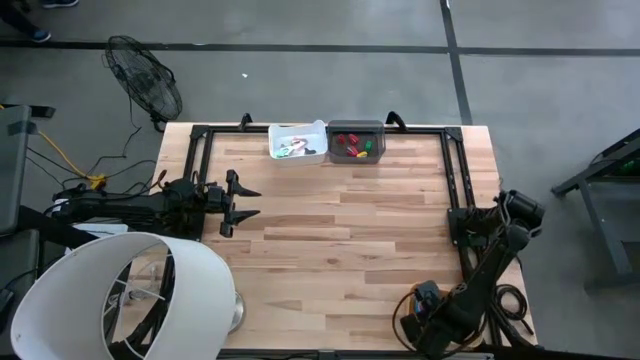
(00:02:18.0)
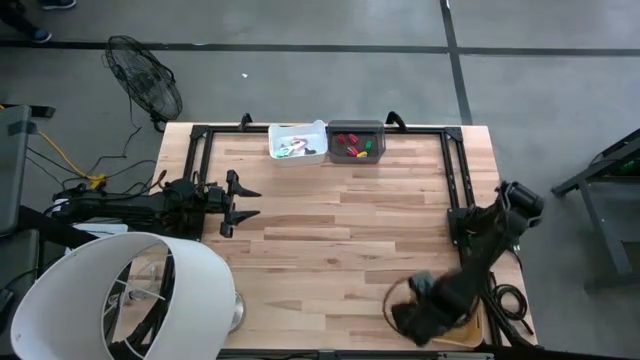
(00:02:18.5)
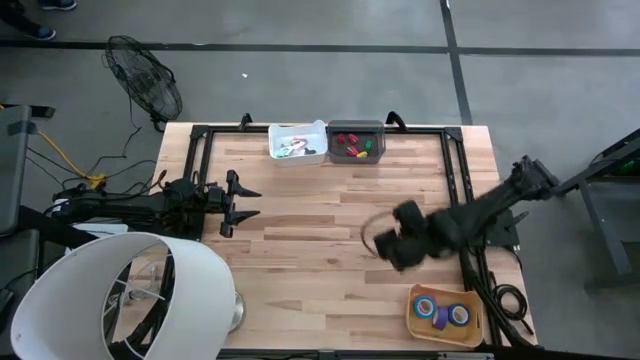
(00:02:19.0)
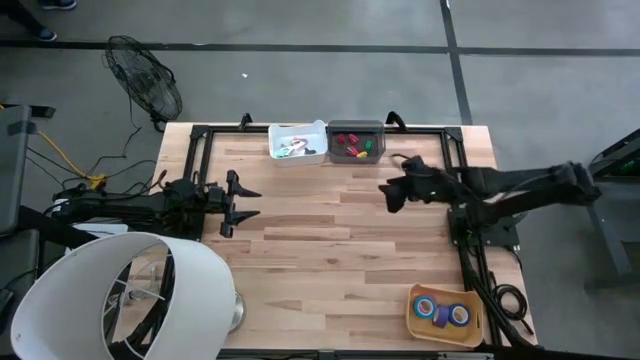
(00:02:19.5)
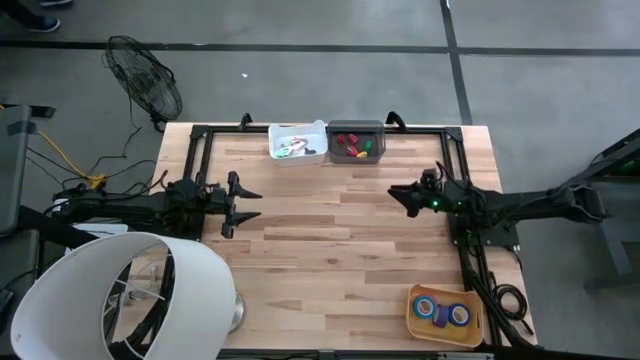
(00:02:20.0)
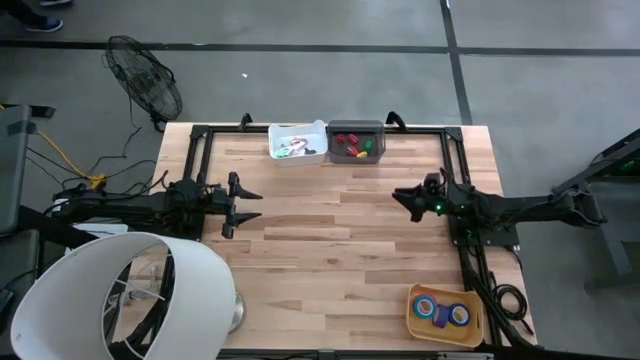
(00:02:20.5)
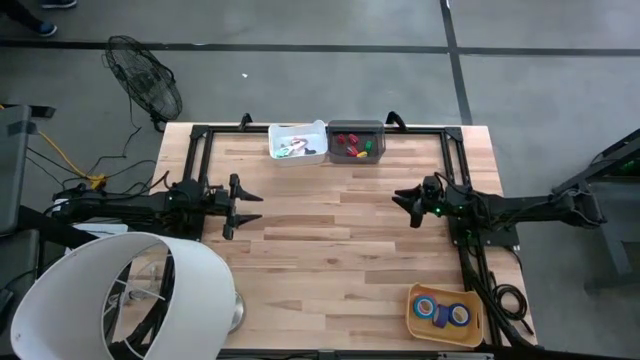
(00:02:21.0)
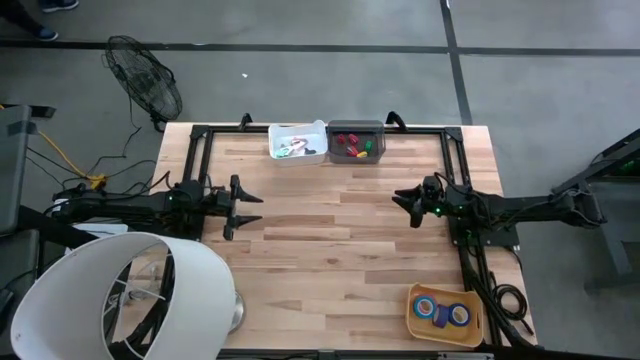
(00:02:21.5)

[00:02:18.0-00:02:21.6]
Task: Pick and place Stapler, Stapler remover, tape
Return to Home Position

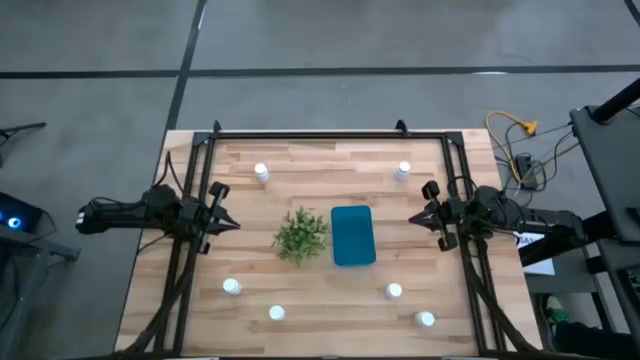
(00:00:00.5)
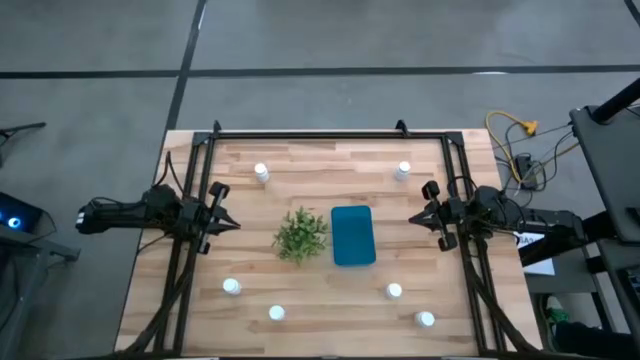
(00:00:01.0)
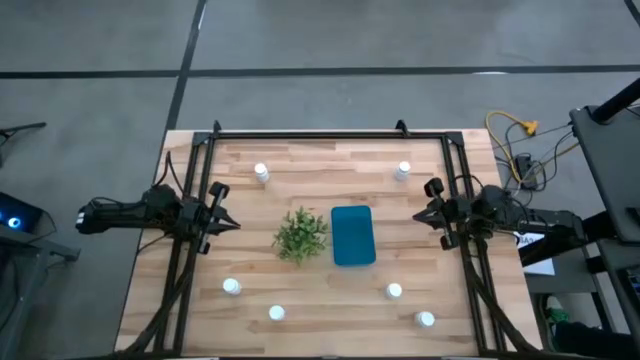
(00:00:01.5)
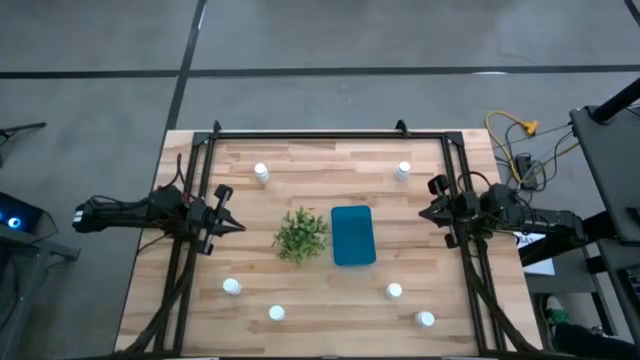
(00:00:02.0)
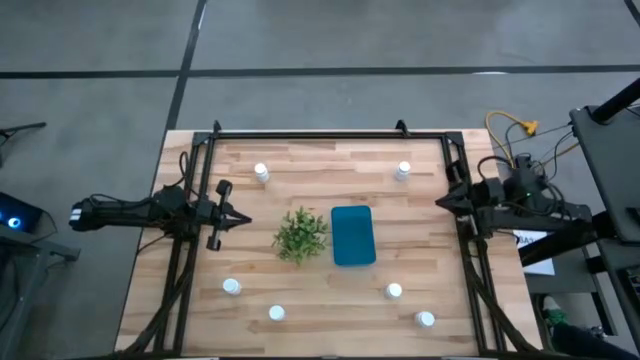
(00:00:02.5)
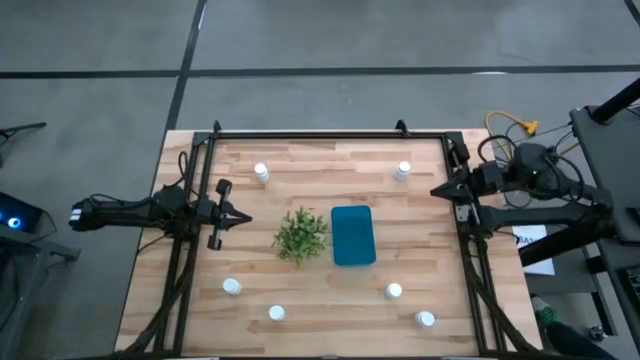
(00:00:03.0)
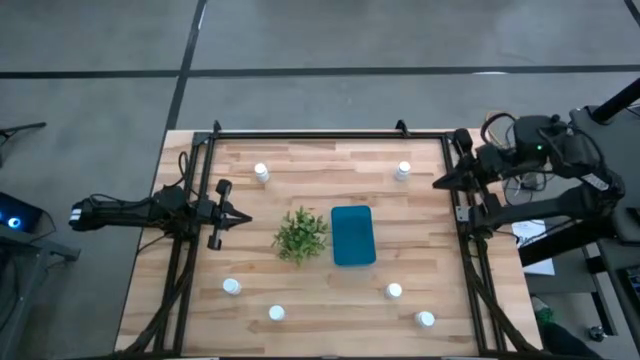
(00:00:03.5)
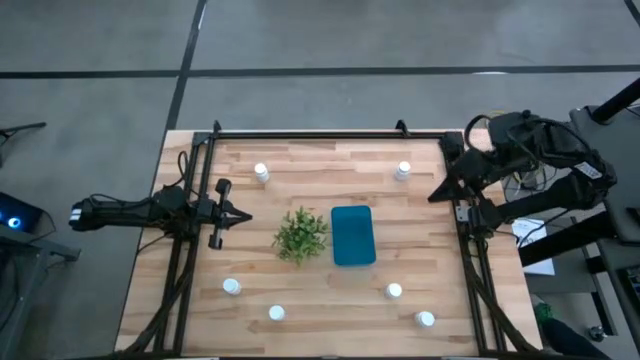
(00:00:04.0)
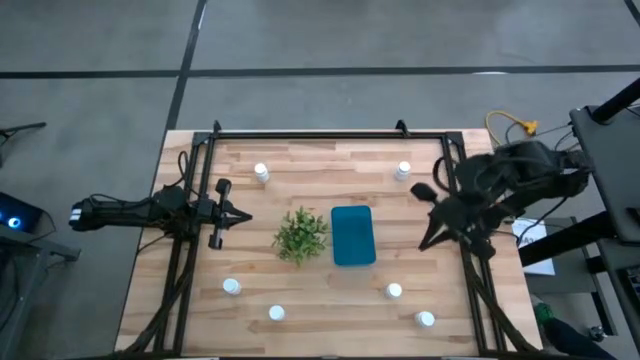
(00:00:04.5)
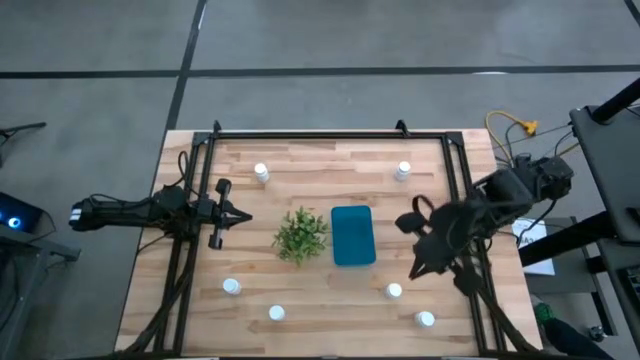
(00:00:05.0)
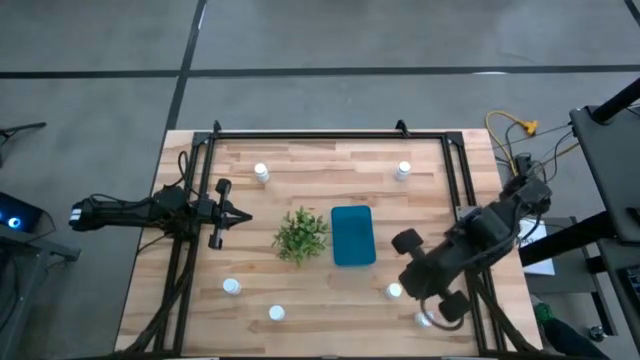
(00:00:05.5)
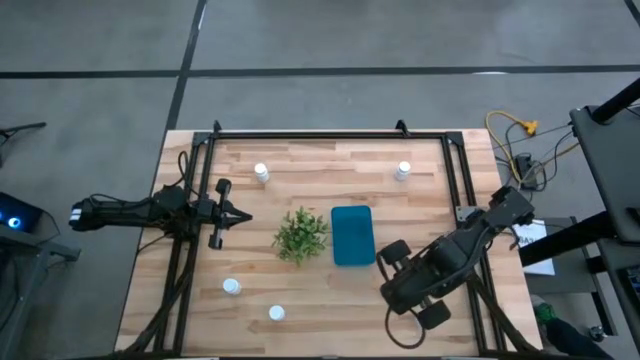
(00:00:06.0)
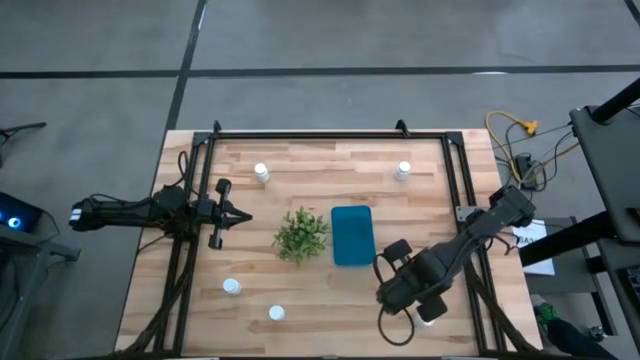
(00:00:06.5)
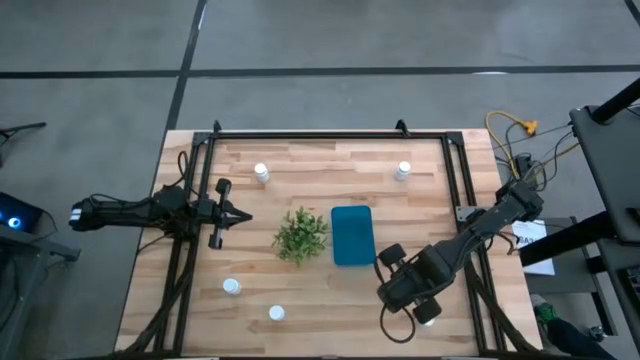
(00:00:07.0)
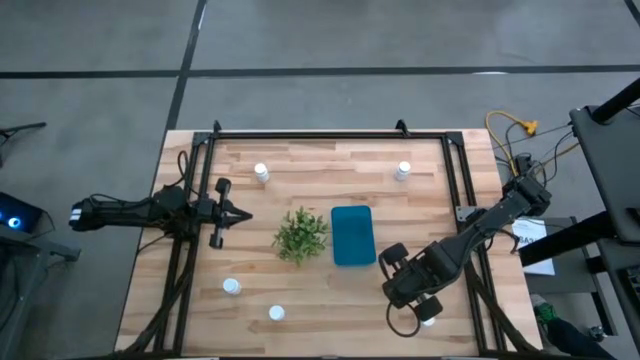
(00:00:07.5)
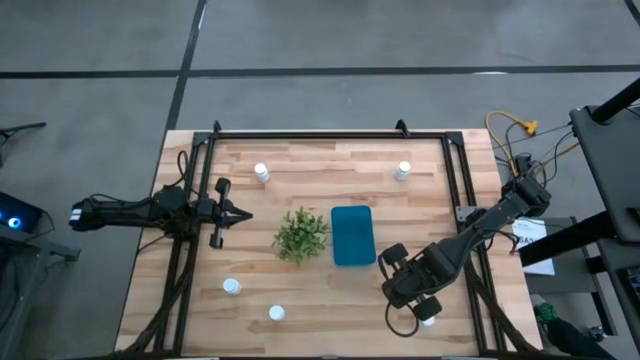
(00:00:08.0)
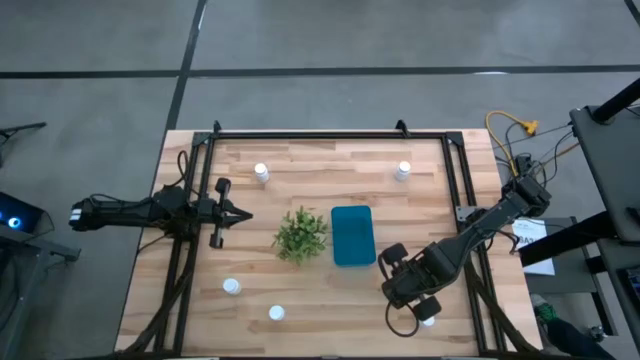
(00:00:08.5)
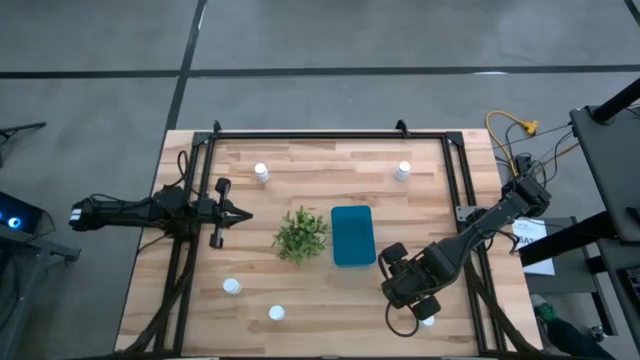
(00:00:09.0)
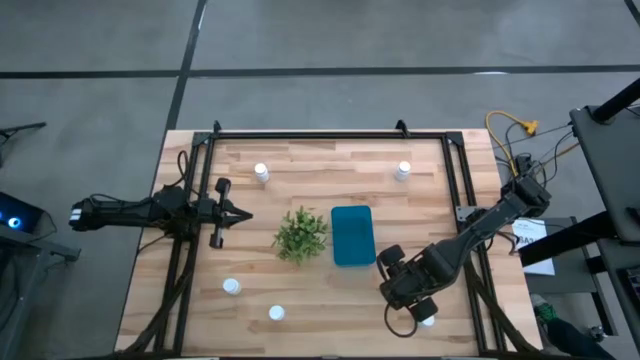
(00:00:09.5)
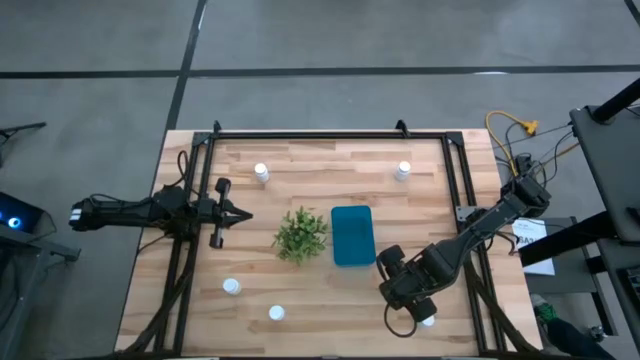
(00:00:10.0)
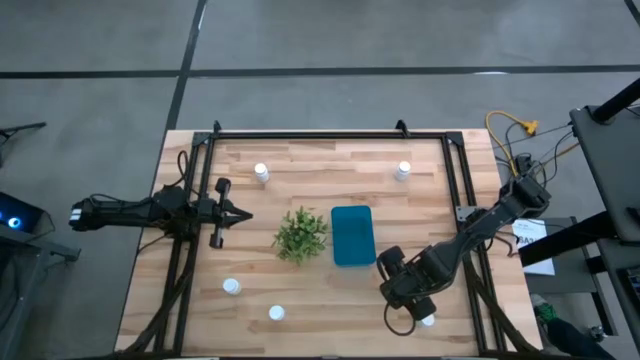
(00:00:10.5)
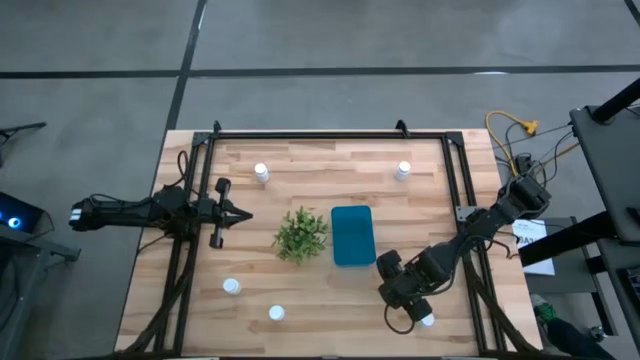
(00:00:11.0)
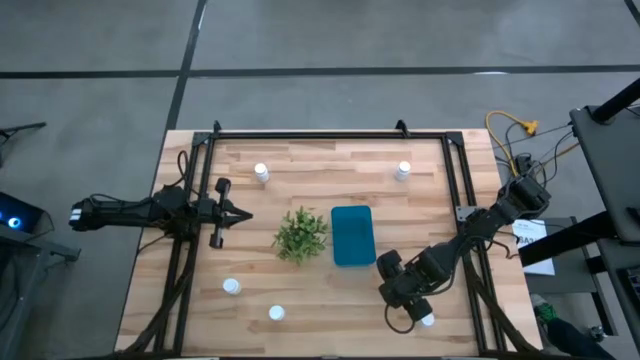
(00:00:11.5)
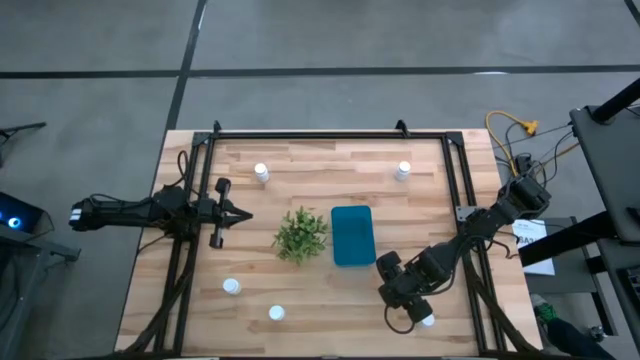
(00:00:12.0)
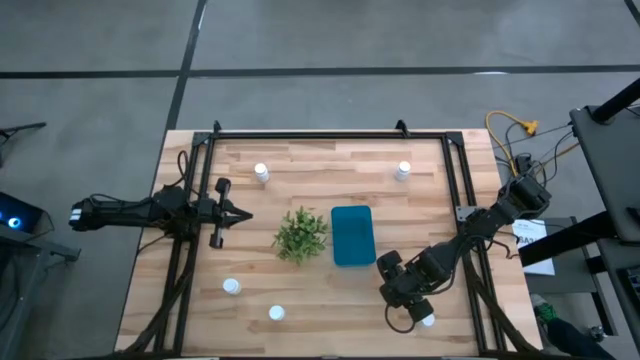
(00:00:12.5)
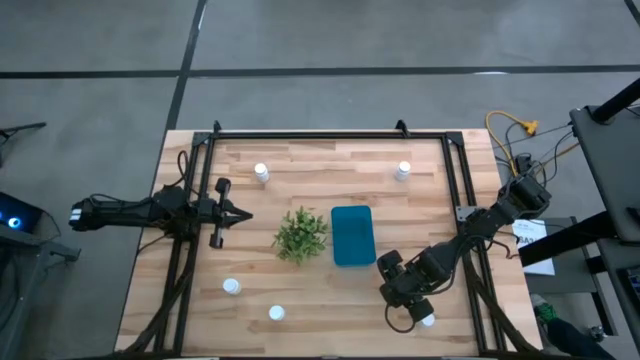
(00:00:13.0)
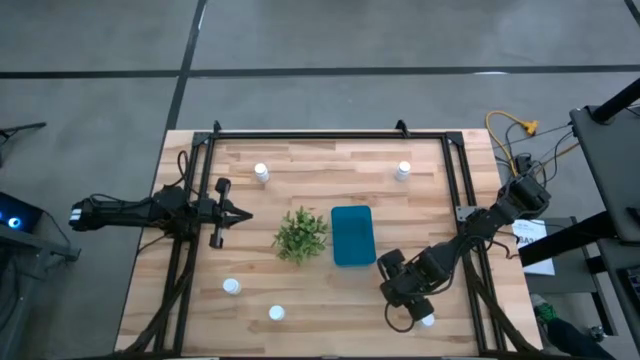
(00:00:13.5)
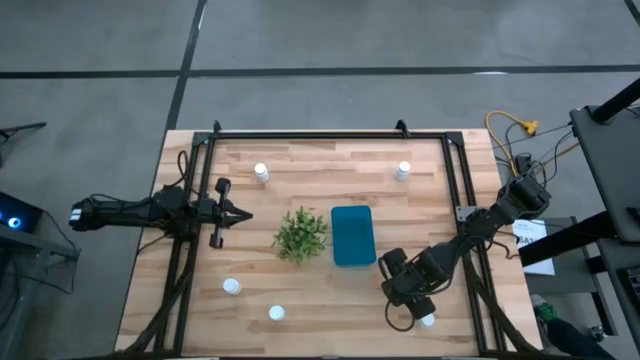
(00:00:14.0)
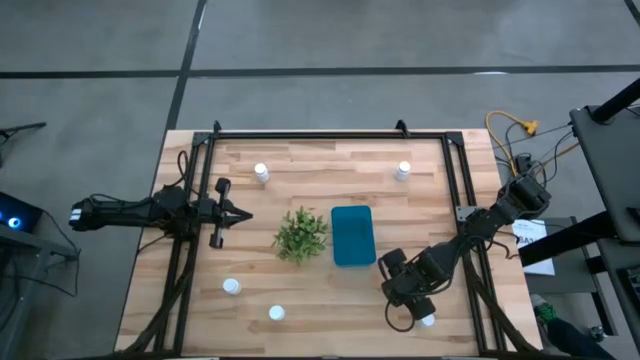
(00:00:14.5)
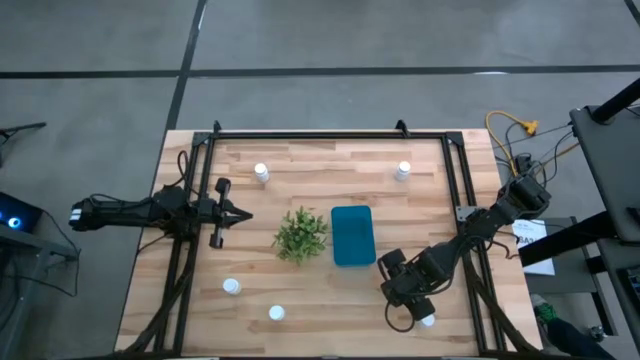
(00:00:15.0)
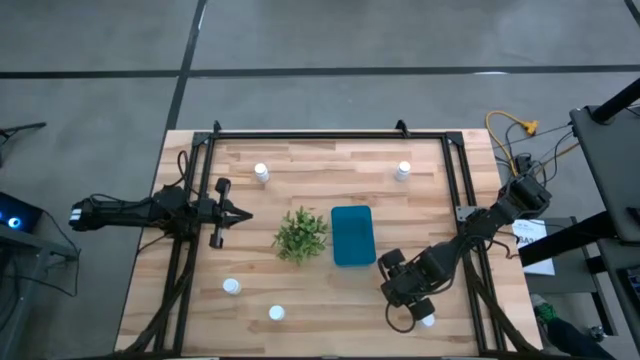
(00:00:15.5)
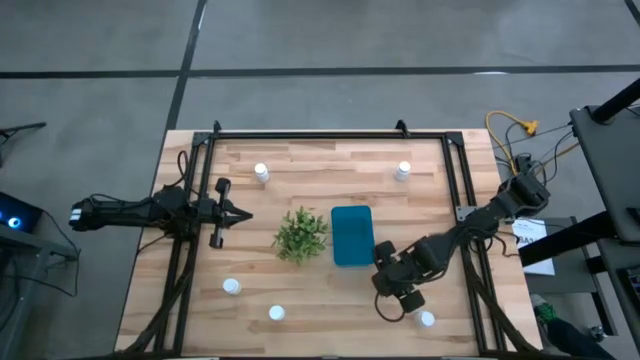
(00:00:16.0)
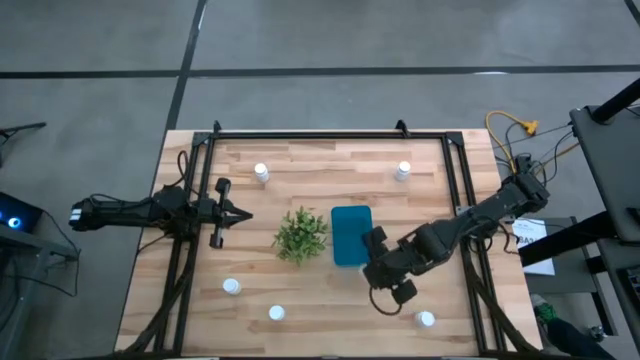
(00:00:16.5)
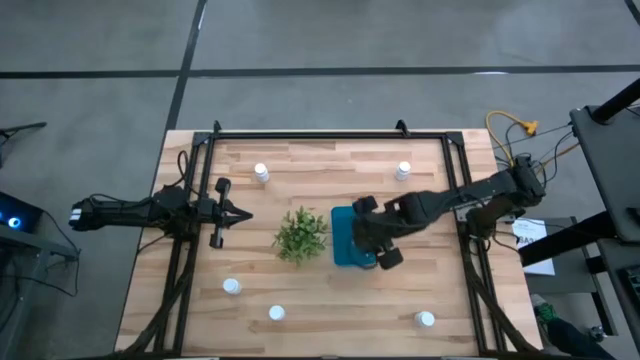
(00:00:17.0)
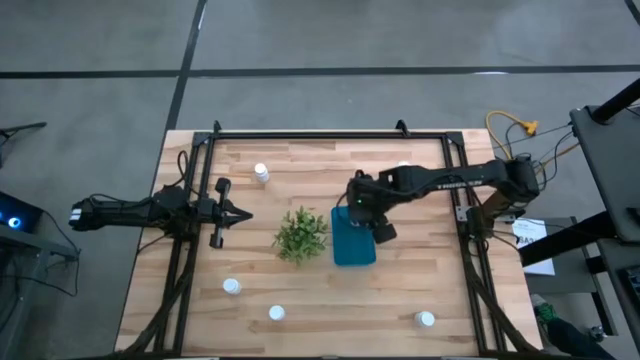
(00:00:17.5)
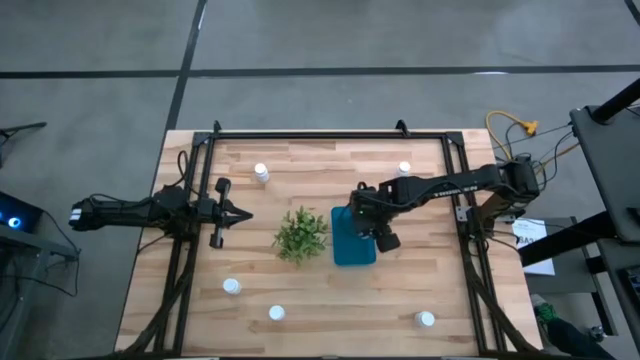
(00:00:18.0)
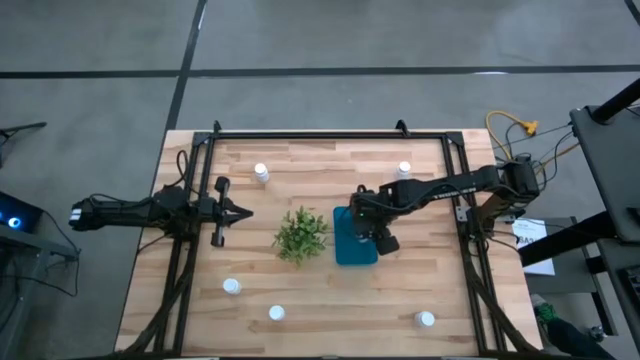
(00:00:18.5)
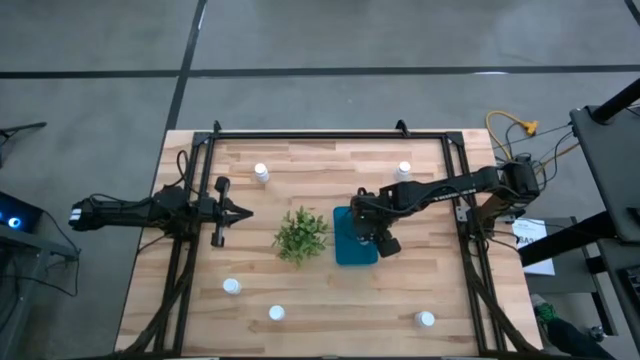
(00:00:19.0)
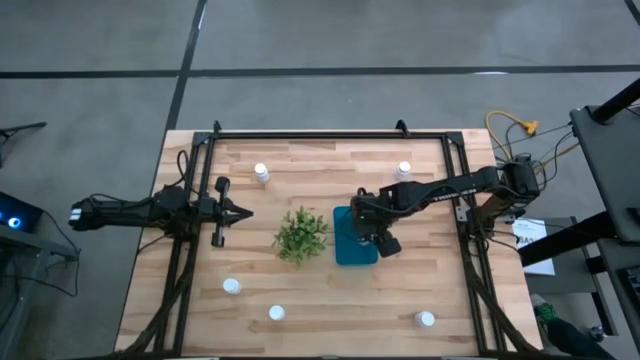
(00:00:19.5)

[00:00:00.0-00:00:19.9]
Task: Pick and place pill bottles into a basket
Put the white medicine bottle into the blue bin
